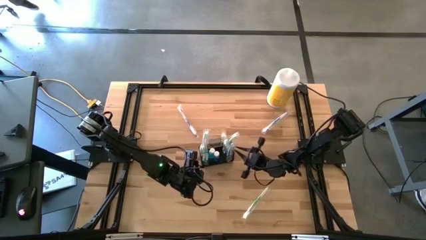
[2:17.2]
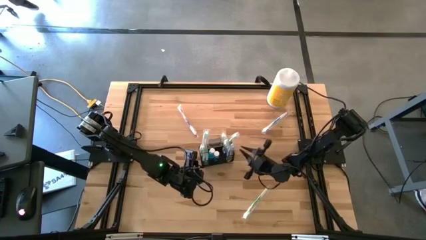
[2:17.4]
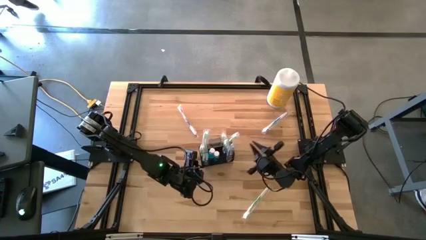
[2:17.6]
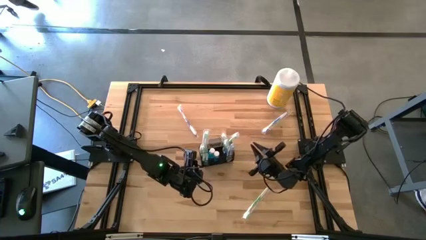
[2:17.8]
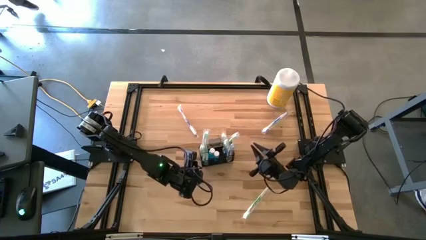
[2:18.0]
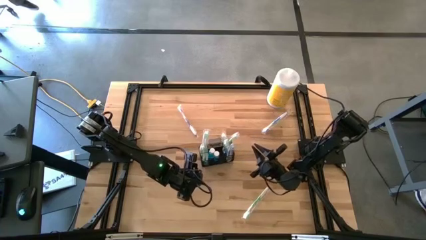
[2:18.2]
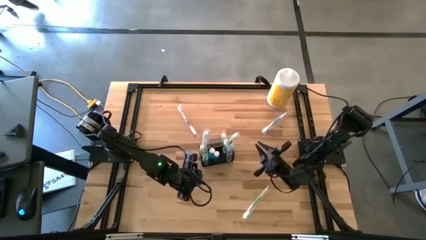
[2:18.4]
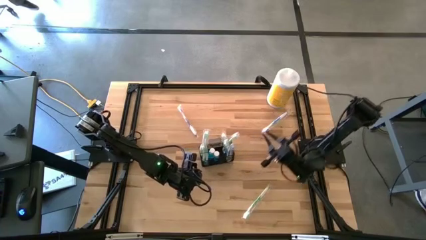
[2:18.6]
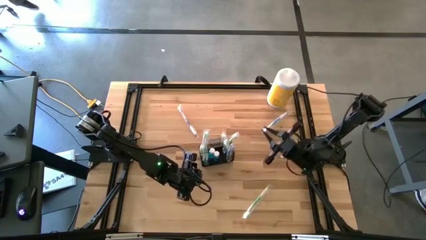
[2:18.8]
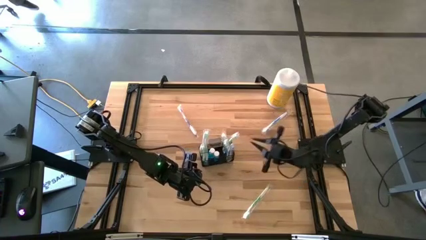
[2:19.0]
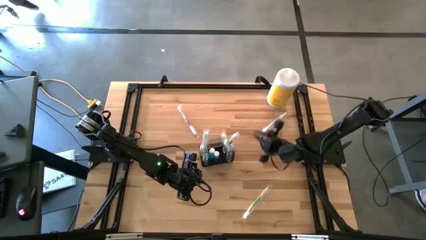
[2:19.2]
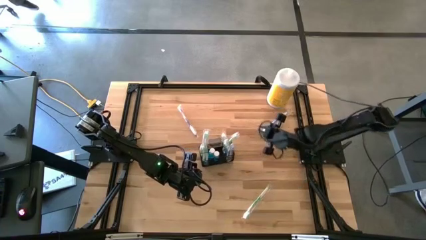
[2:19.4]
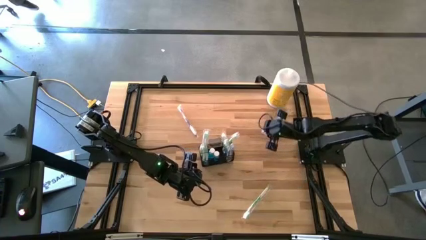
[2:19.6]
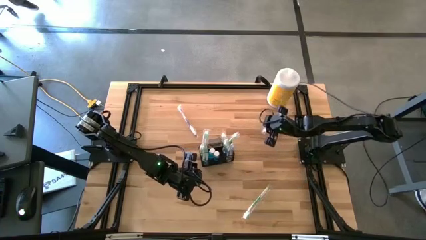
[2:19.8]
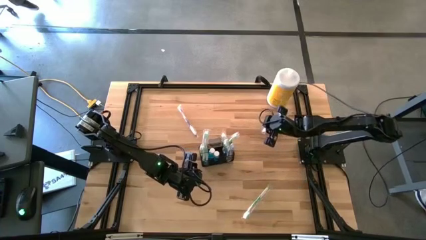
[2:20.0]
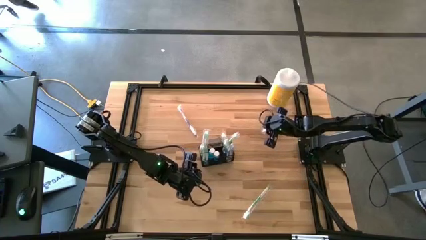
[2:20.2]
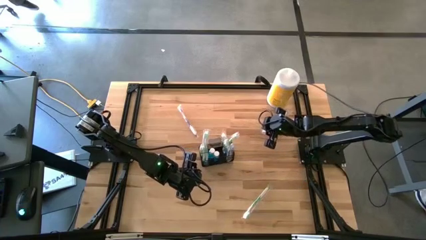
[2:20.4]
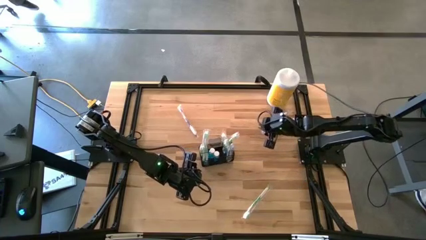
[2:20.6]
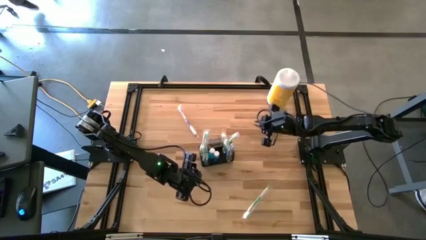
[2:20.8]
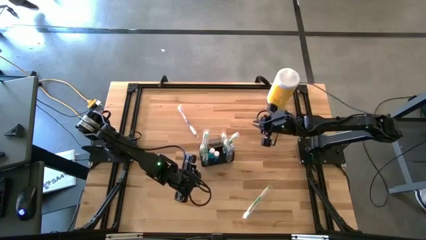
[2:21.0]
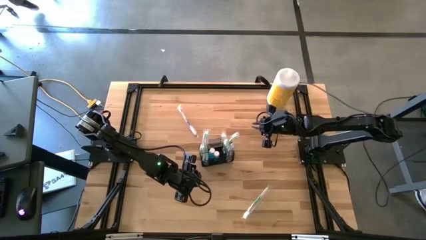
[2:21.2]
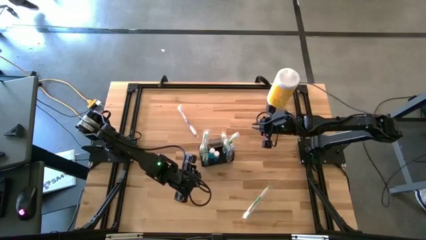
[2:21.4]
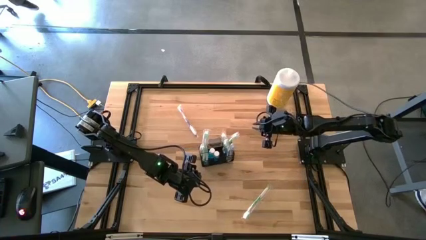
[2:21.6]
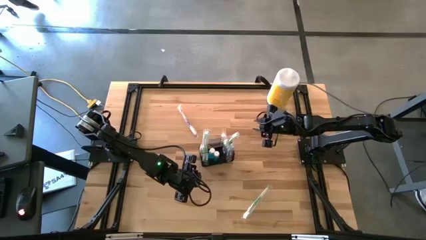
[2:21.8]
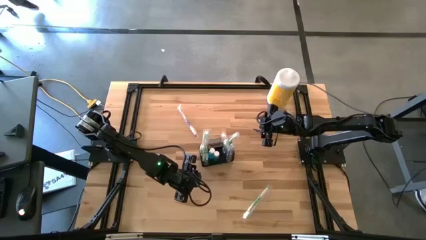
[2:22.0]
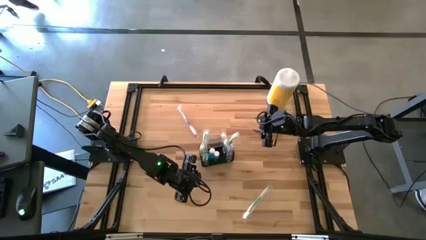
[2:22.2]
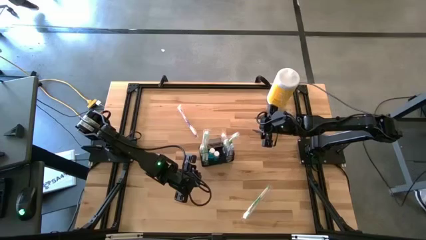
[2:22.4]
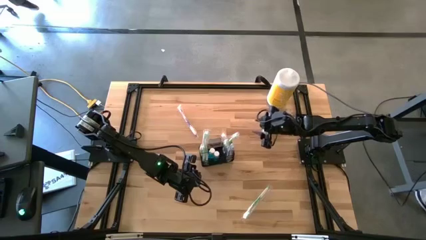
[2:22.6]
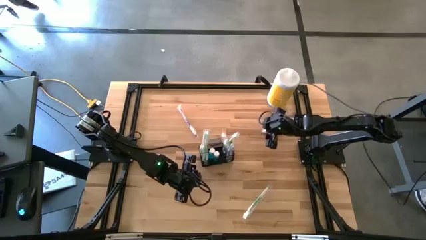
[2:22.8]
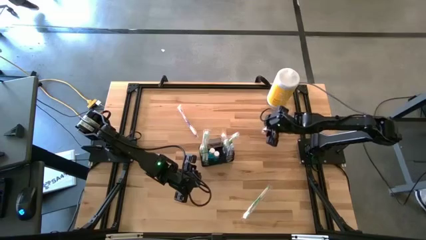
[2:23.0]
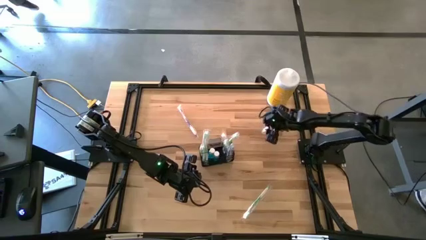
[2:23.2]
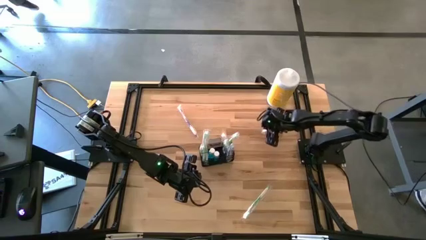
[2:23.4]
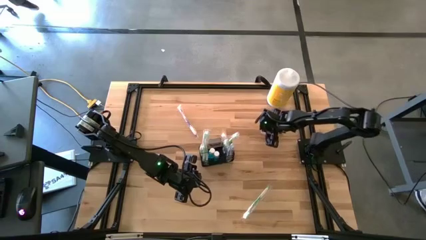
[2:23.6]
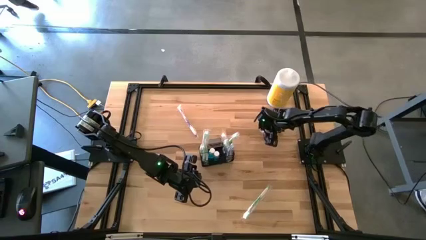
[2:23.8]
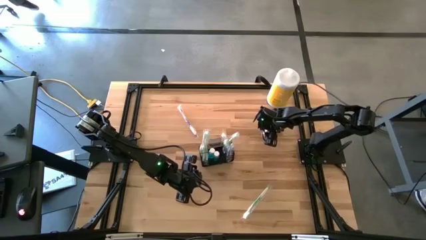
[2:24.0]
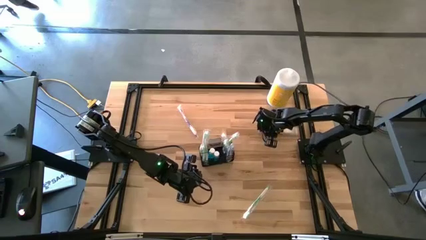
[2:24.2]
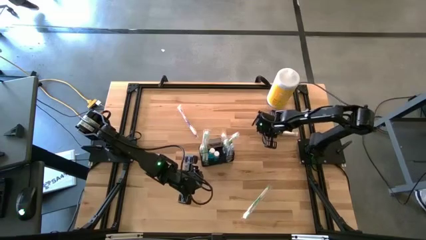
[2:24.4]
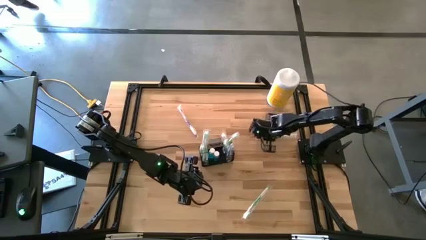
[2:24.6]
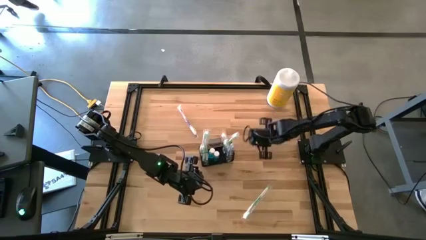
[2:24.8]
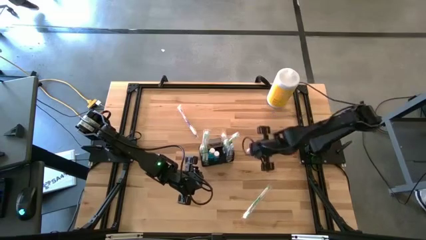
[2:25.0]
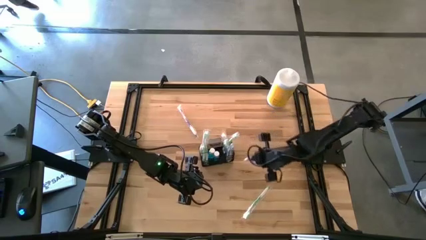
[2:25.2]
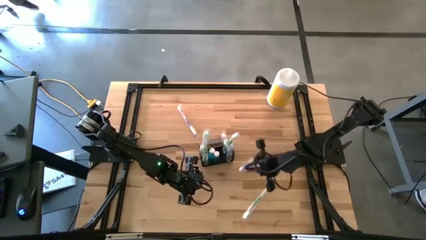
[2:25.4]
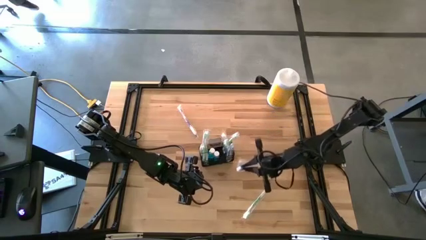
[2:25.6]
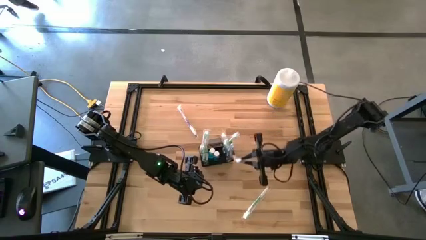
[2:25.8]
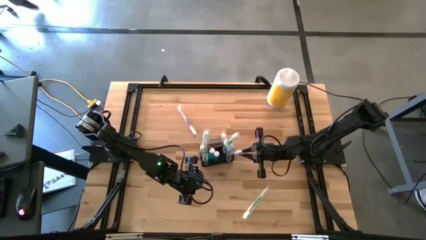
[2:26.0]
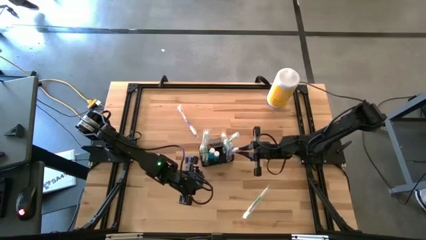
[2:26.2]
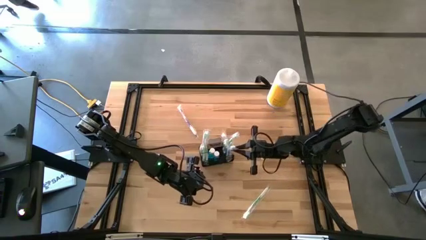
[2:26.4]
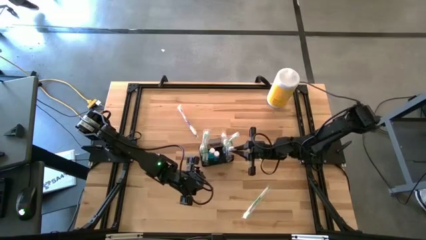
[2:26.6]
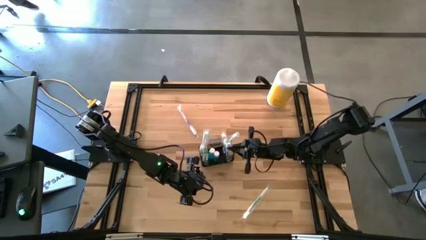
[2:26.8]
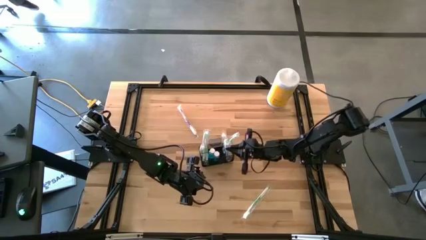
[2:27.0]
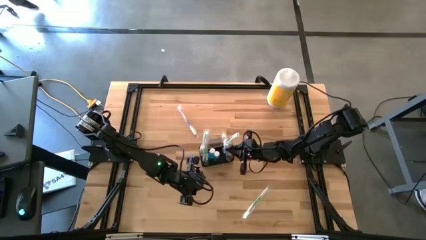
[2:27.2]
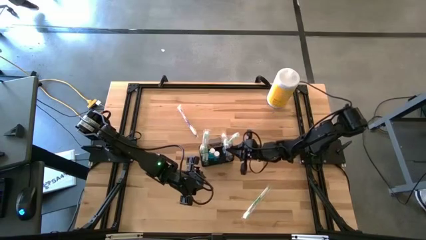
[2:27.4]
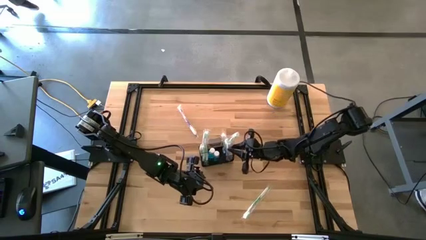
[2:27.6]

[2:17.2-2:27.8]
Task: Pick & Place toothbrushing station
Put the blue toothbrush into the black mesh organizer

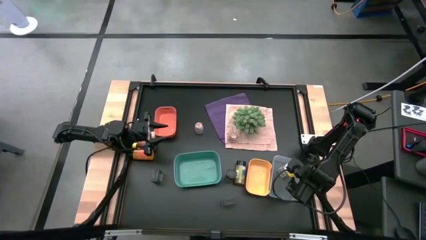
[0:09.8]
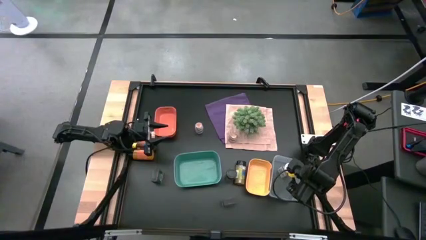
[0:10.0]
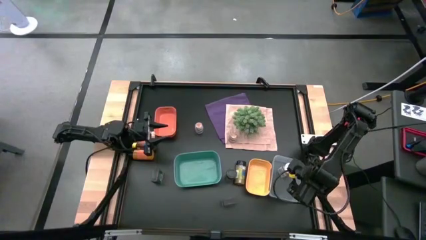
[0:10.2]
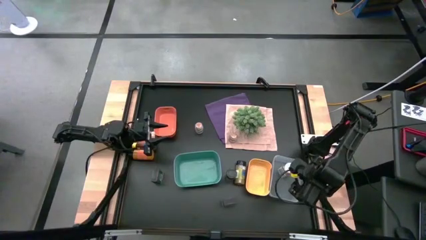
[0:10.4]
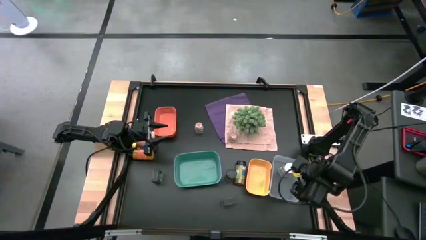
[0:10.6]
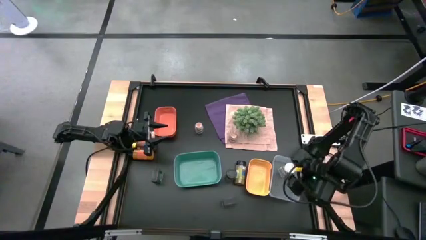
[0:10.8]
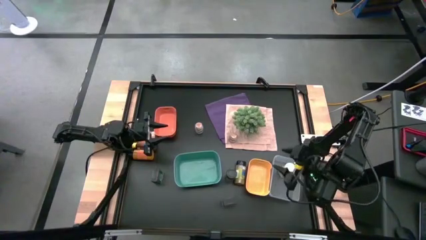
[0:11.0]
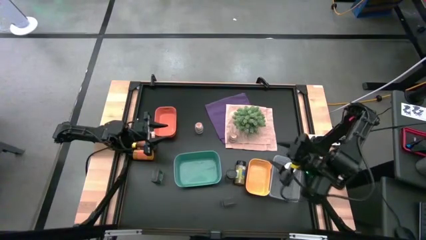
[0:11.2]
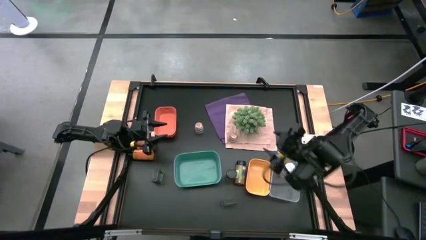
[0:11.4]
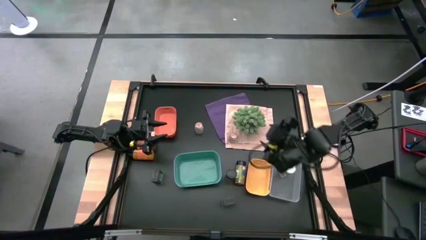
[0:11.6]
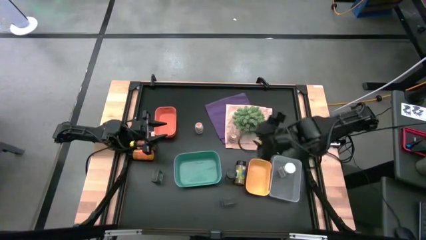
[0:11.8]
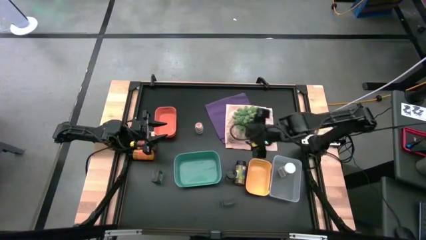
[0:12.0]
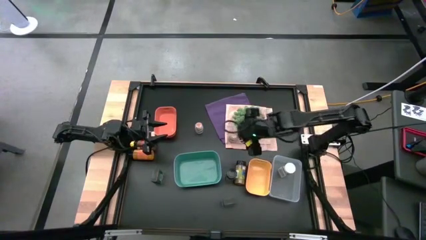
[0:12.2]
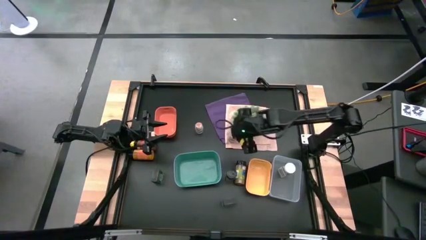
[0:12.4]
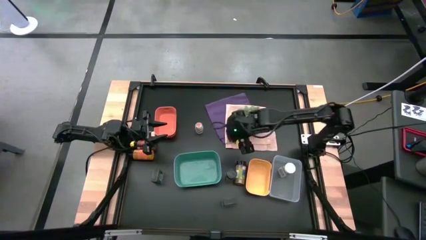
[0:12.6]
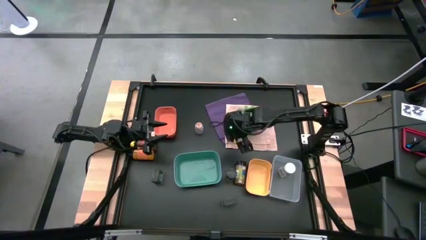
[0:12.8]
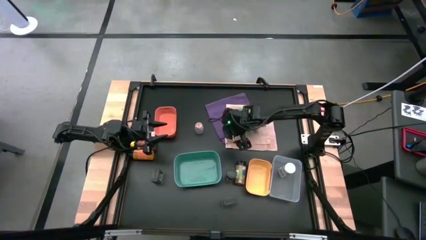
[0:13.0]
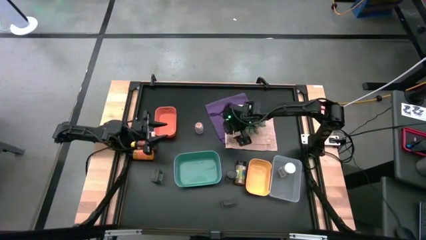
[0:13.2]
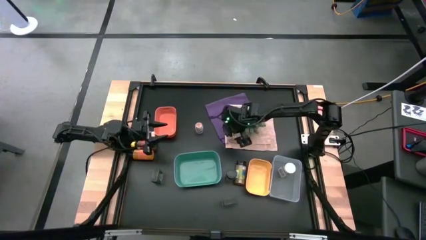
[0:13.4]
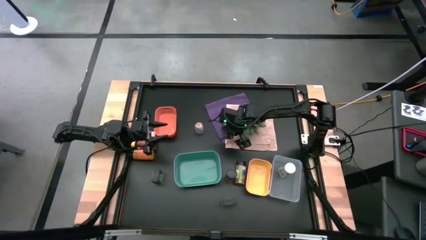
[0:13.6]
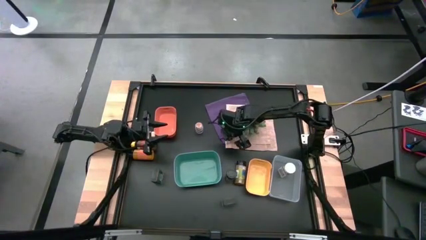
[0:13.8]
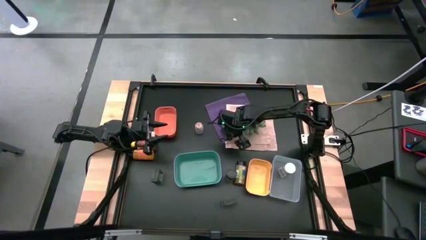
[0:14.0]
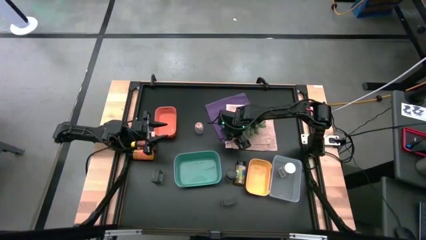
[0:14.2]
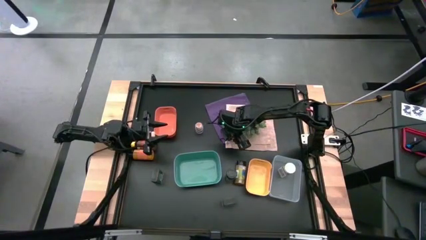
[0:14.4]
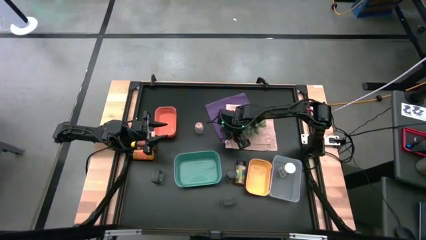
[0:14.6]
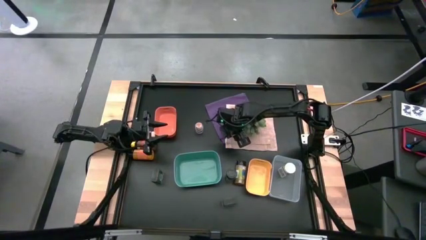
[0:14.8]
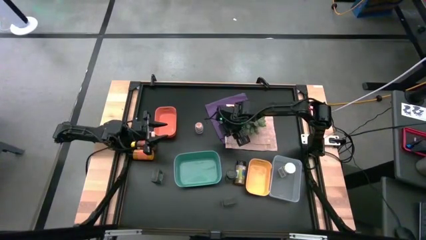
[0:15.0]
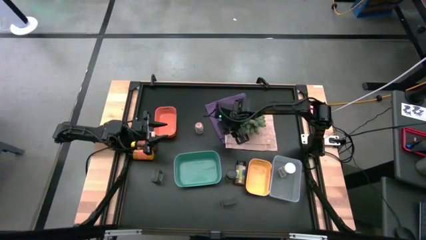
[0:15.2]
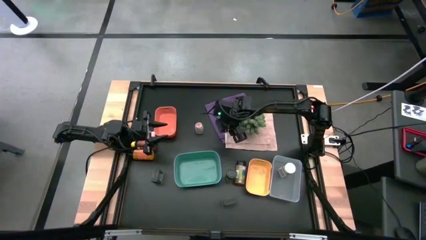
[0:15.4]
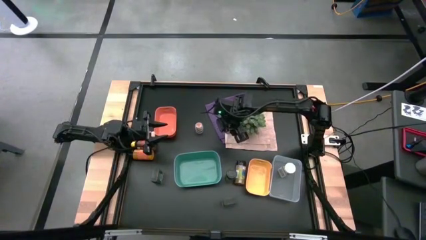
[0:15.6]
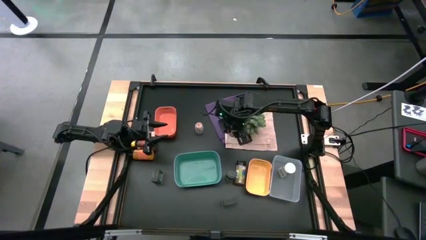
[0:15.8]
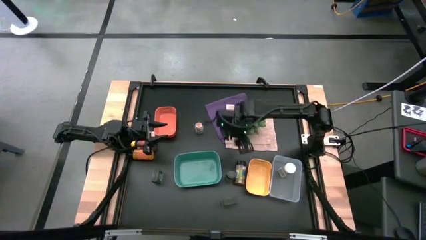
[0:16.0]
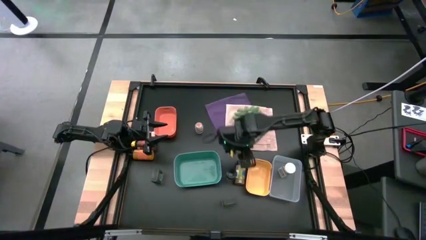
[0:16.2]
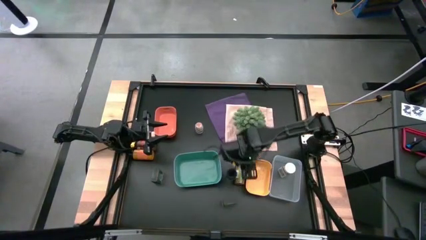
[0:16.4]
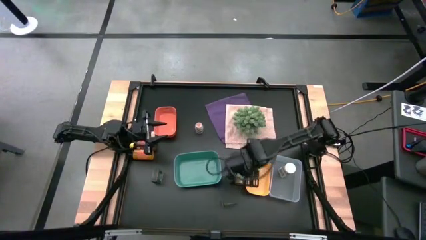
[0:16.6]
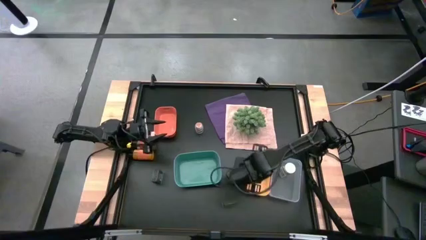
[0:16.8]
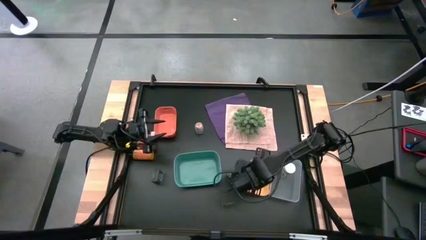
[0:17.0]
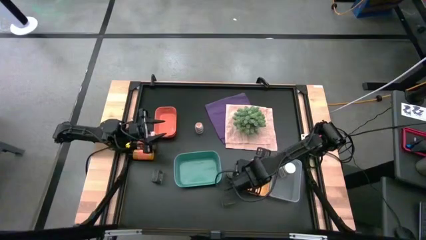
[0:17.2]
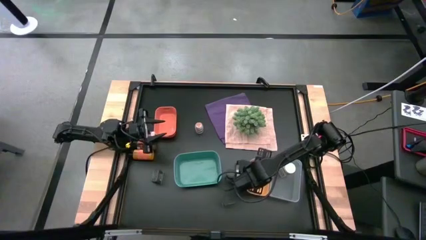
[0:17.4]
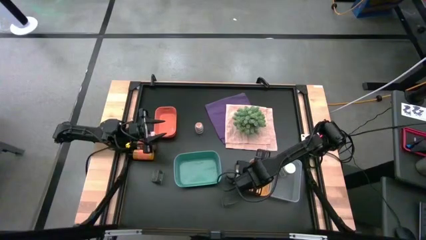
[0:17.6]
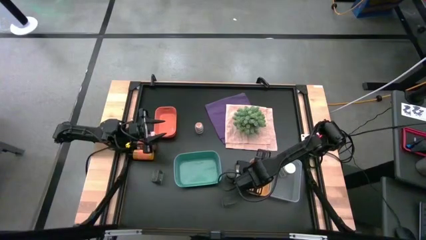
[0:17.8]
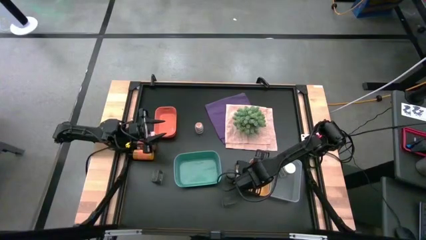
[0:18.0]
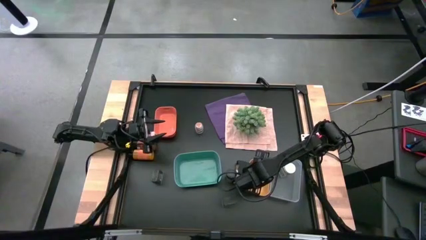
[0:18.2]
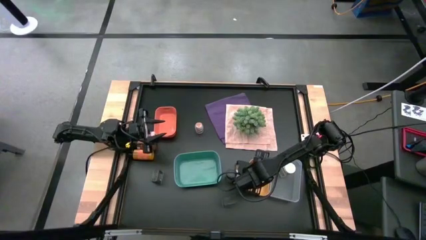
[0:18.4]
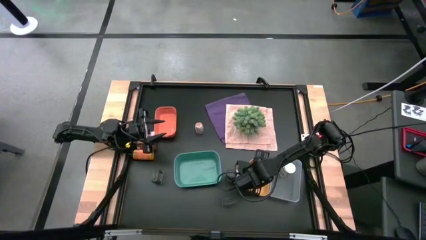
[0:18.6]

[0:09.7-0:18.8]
Task: Sort spices by type
Put the right brown seasoning bottle into the yellow bin
